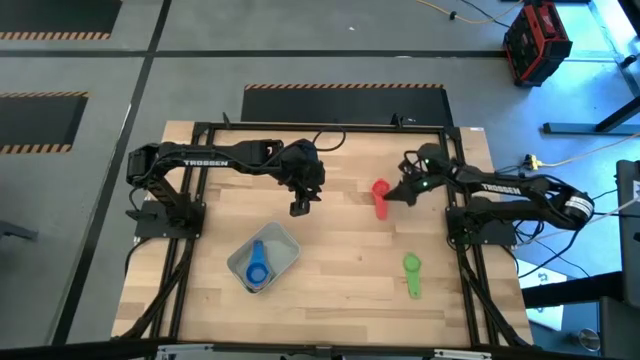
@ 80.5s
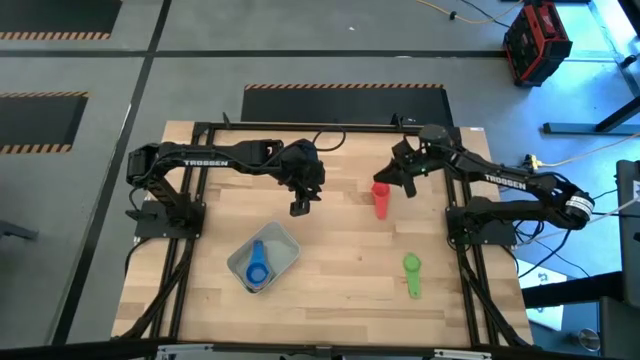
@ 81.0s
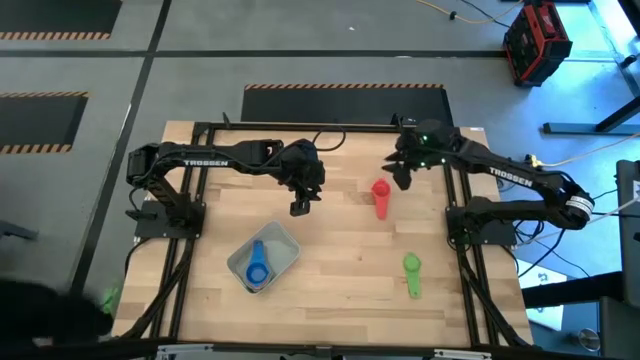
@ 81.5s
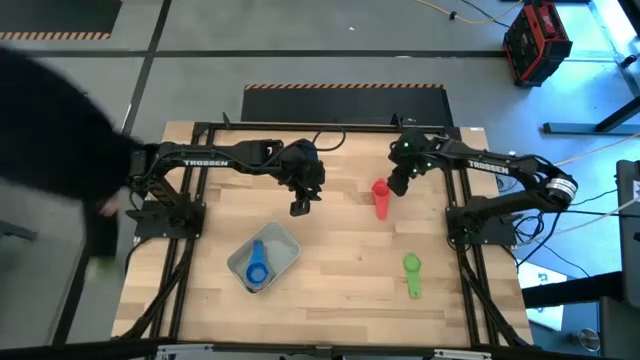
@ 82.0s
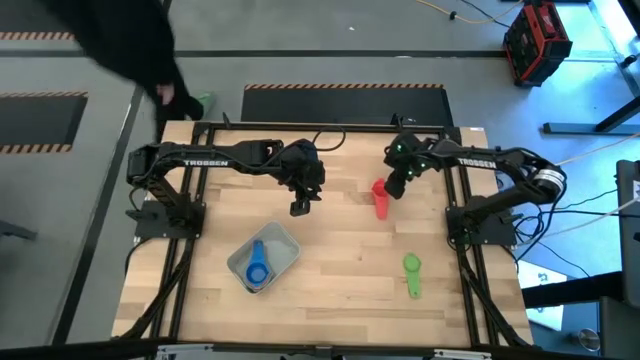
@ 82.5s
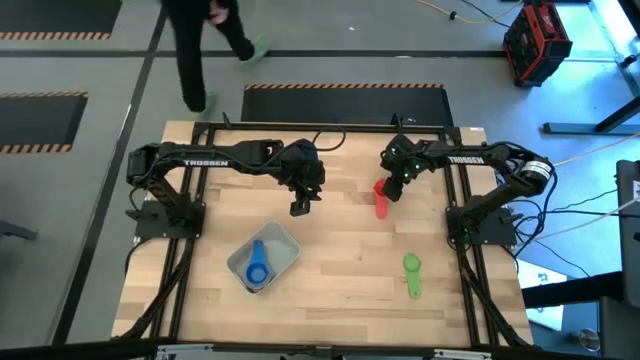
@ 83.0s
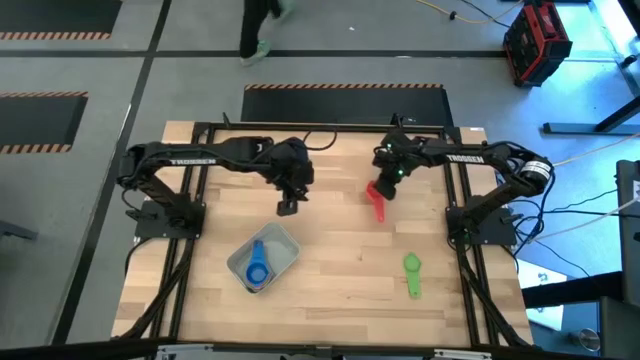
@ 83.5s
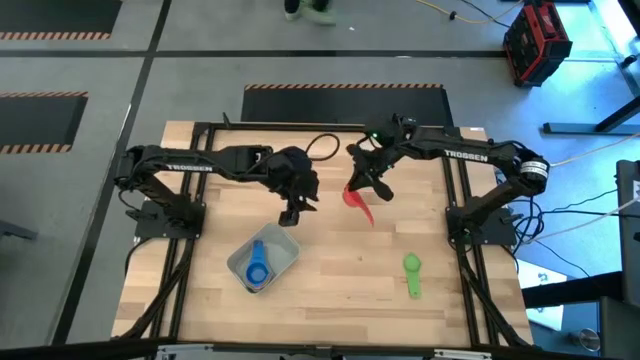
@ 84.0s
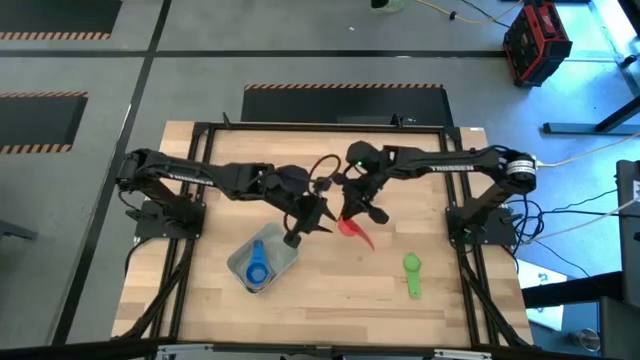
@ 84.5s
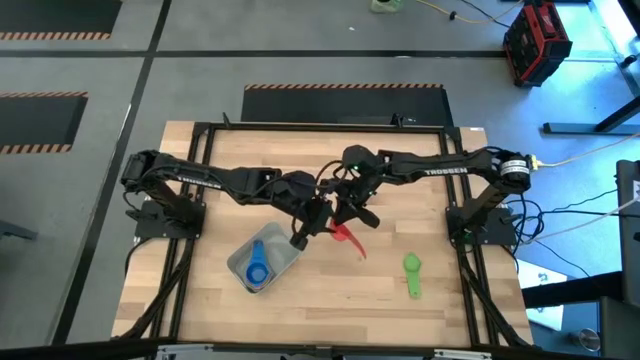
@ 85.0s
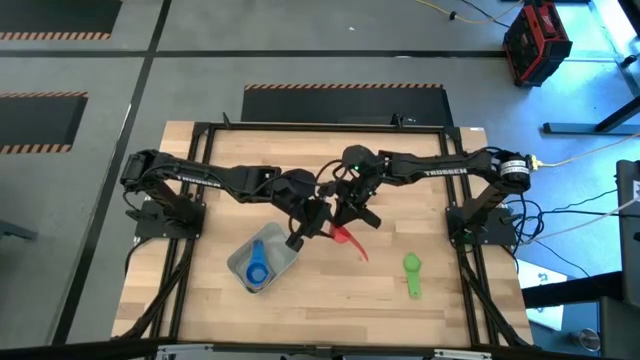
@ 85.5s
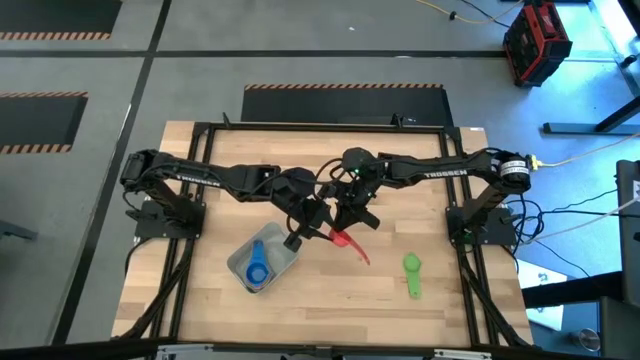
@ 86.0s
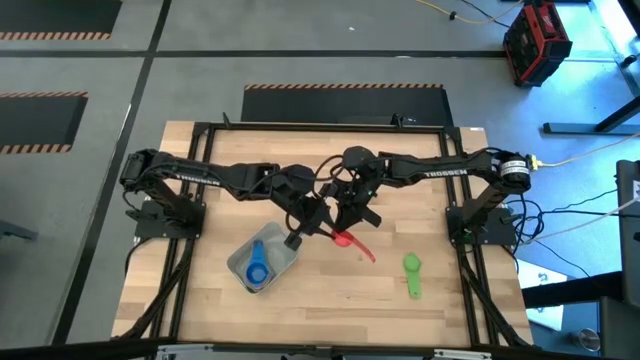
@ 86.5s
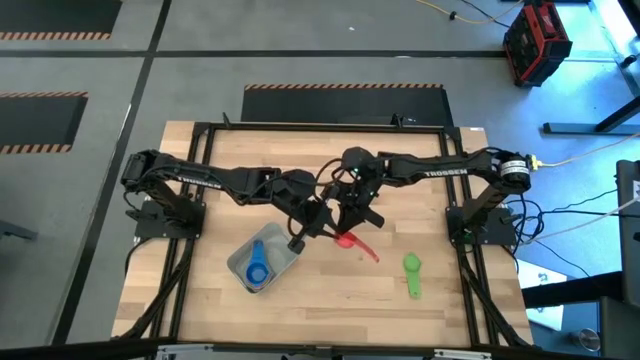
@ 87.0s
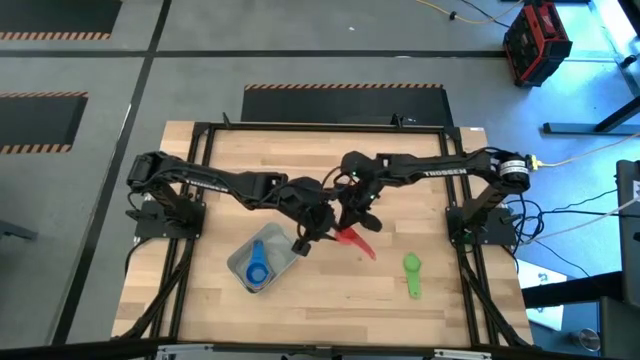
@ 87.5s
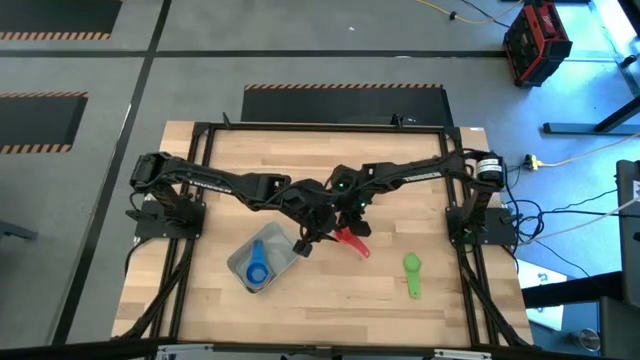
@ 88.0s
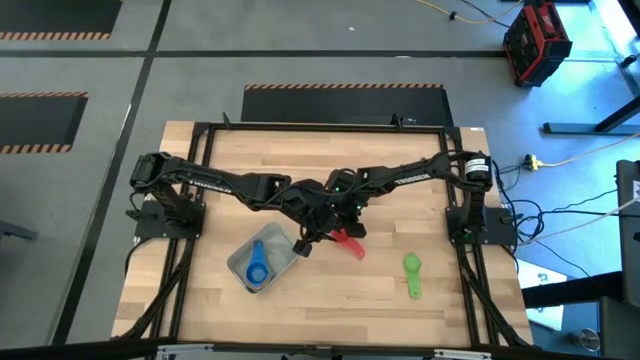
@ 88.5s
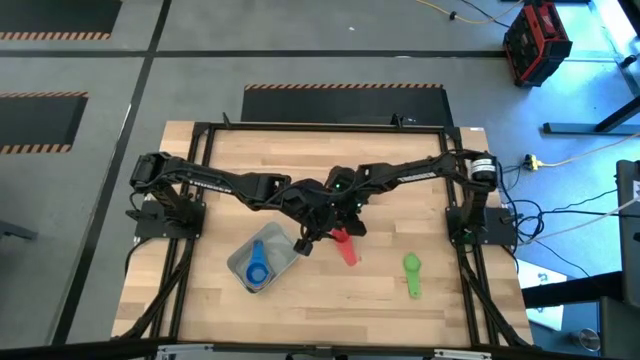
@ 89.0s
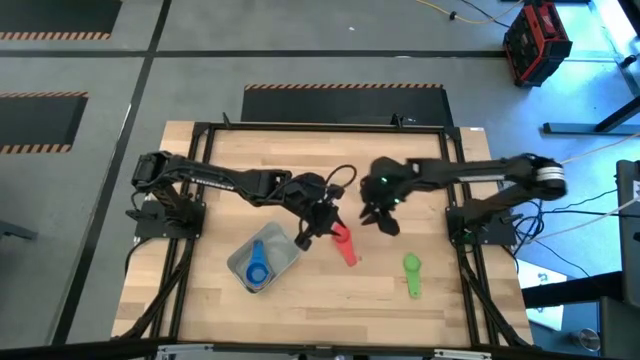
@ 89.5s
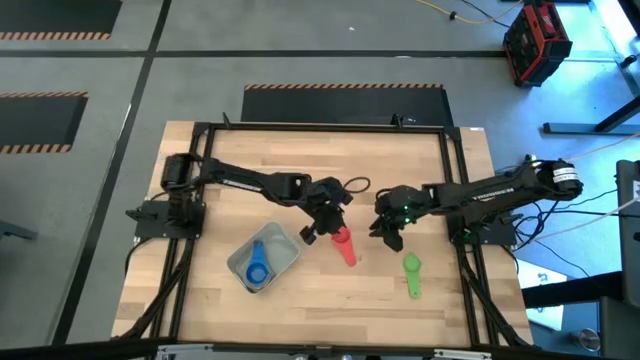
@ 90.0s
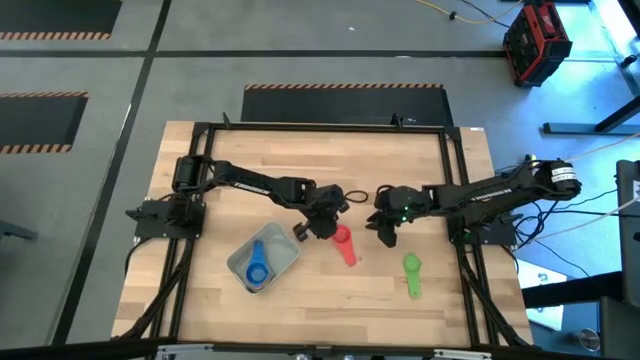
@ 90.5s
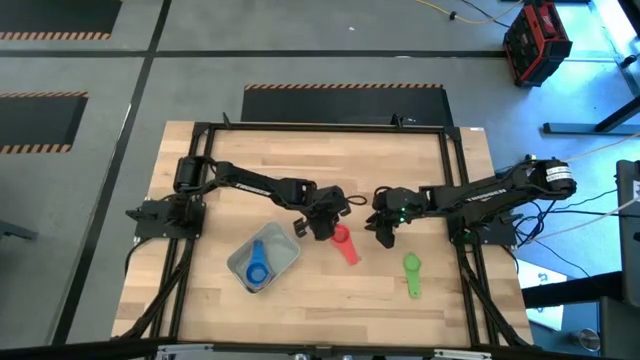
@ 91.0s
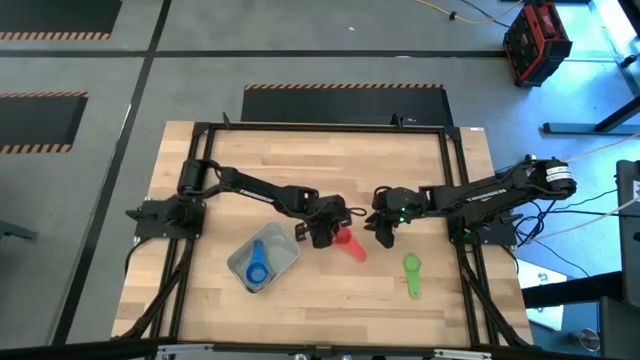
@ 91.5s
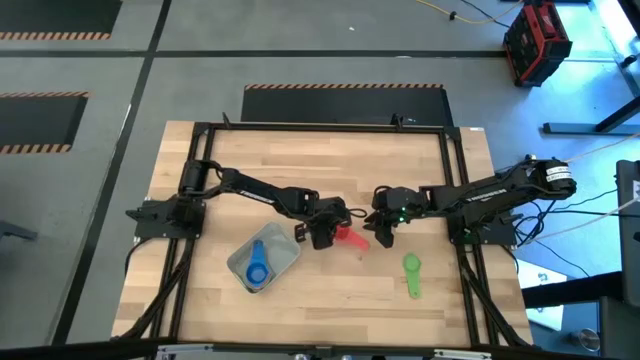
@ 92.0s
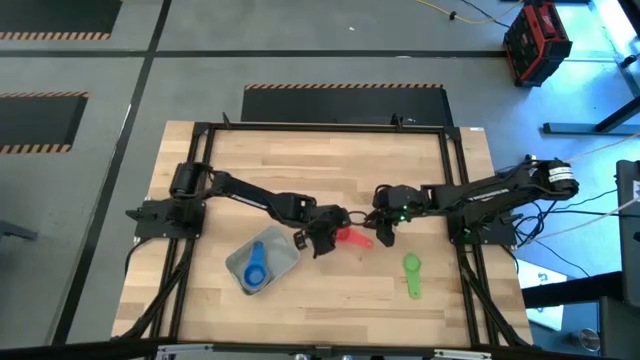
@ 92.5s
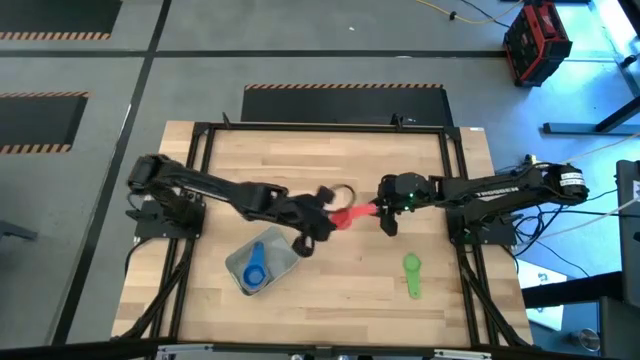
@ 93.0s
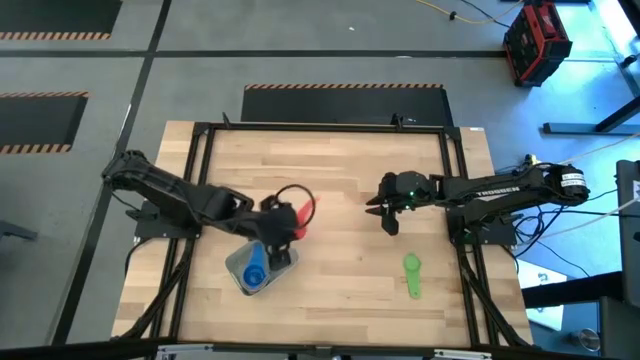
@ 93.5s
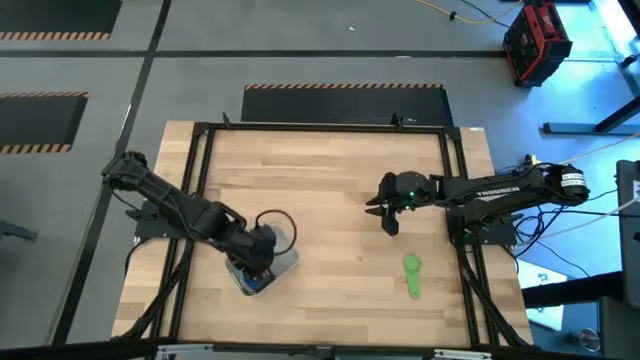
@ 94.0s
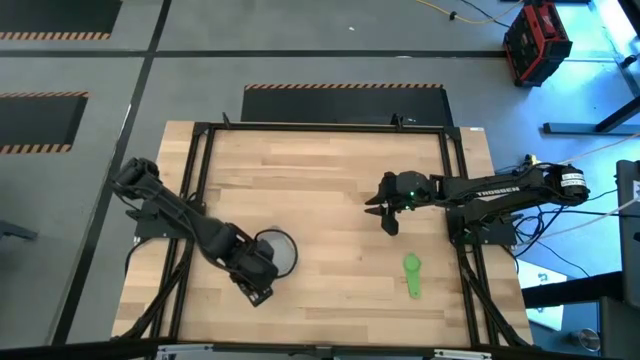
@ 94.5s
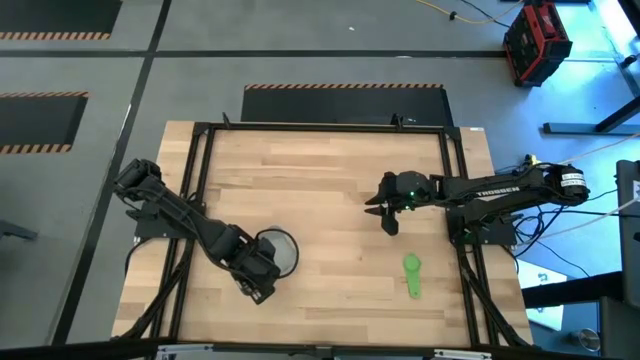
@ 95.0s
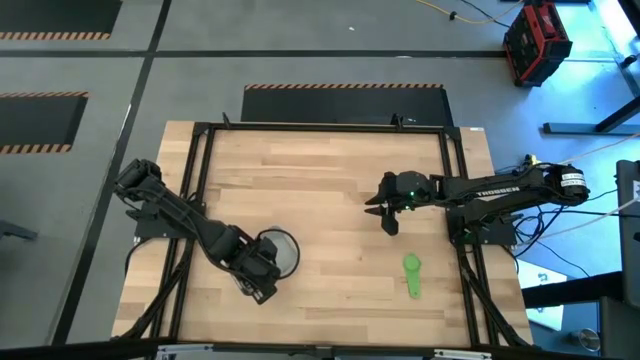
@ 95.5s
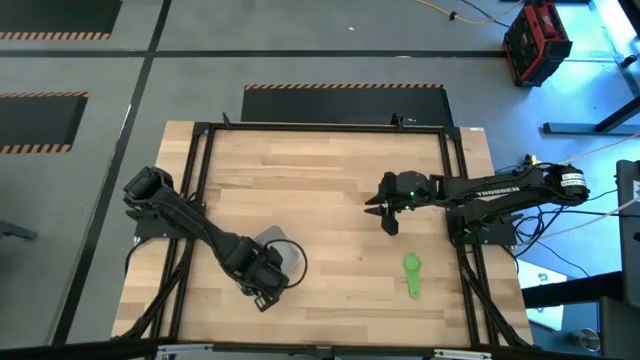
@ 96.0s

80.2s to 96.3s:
Task: Nest measuring cups in basket
Stack the red measuring cup on the blue measuring cup in the gray bin
